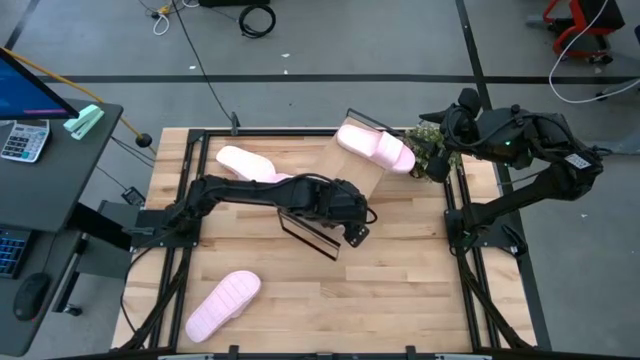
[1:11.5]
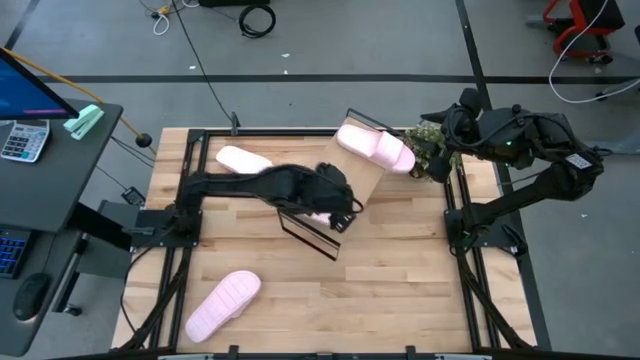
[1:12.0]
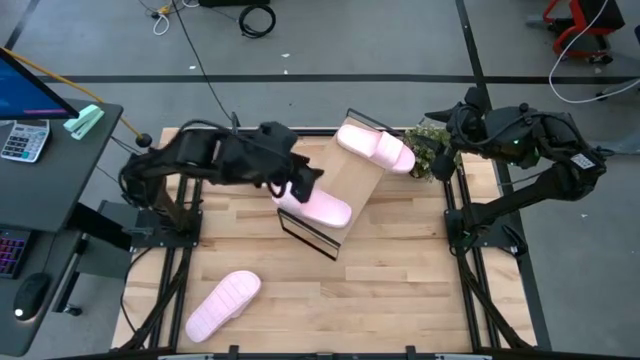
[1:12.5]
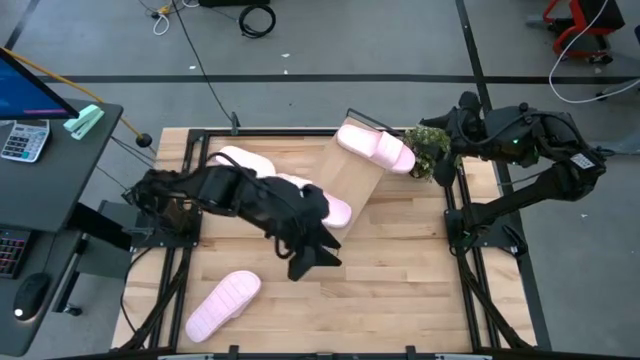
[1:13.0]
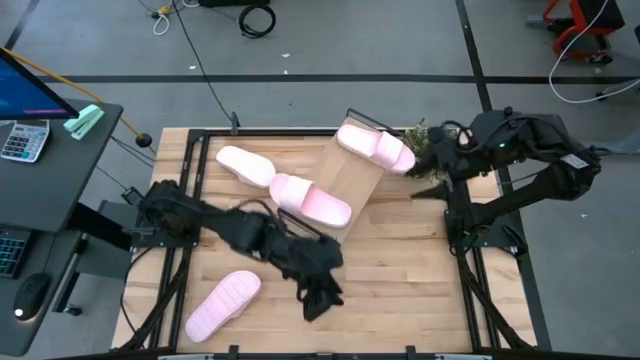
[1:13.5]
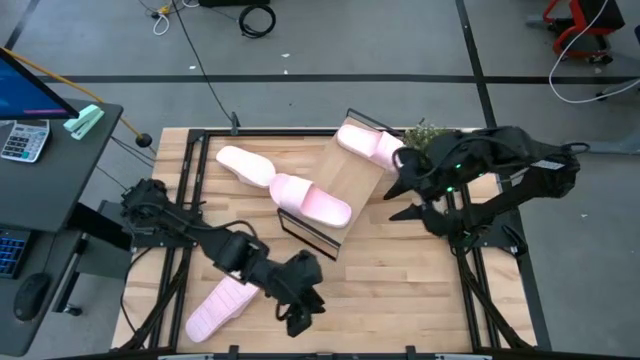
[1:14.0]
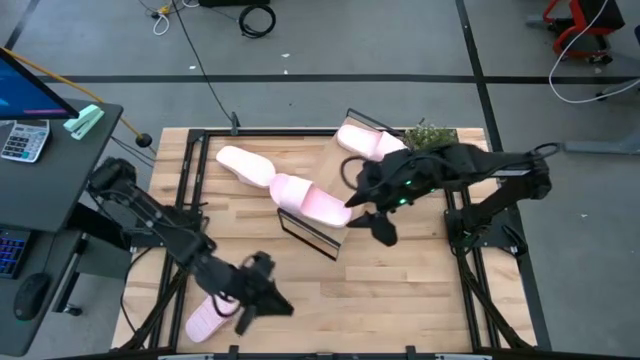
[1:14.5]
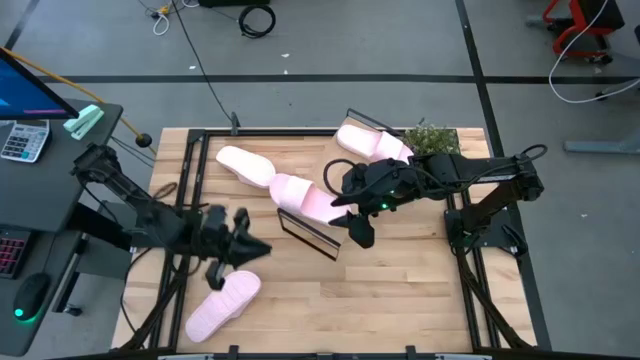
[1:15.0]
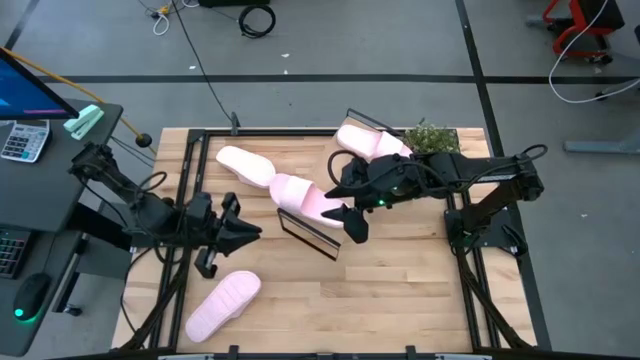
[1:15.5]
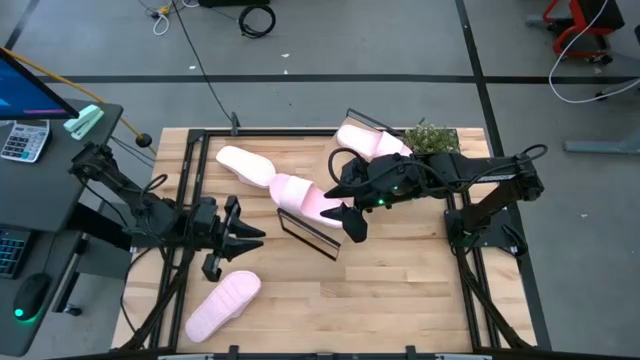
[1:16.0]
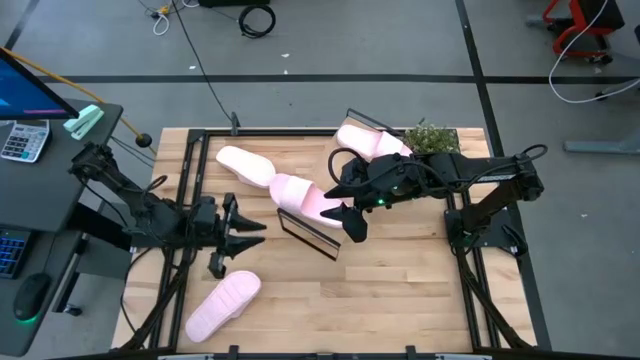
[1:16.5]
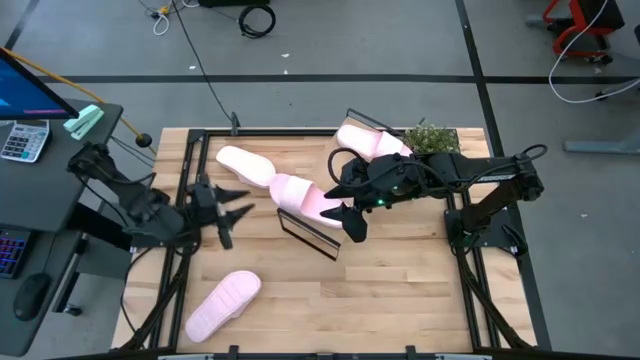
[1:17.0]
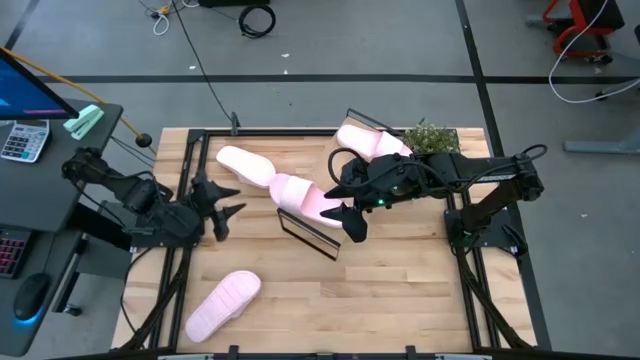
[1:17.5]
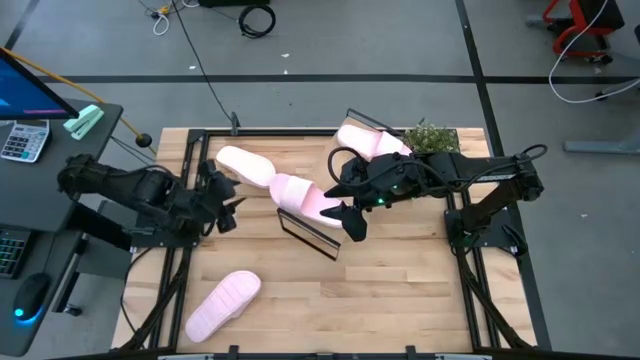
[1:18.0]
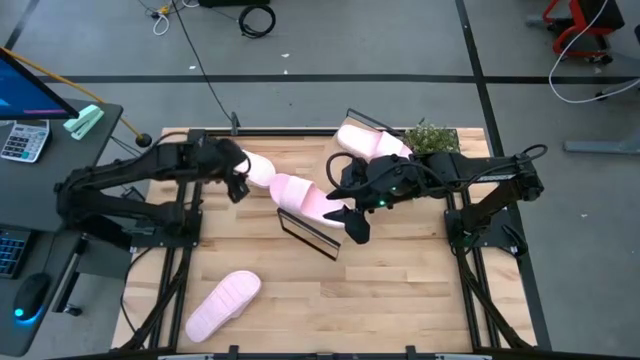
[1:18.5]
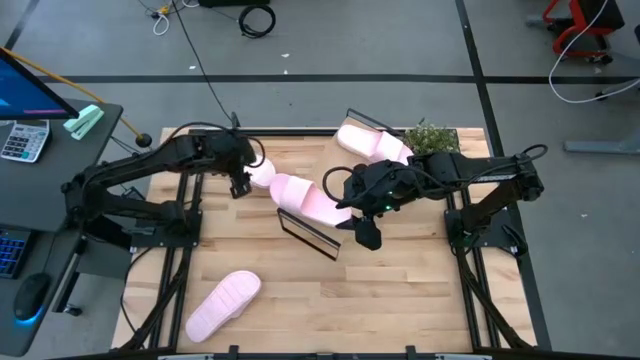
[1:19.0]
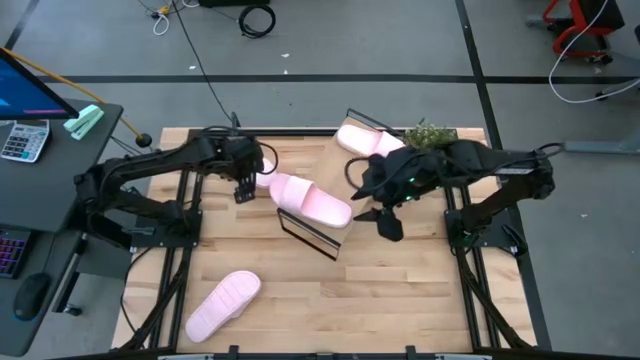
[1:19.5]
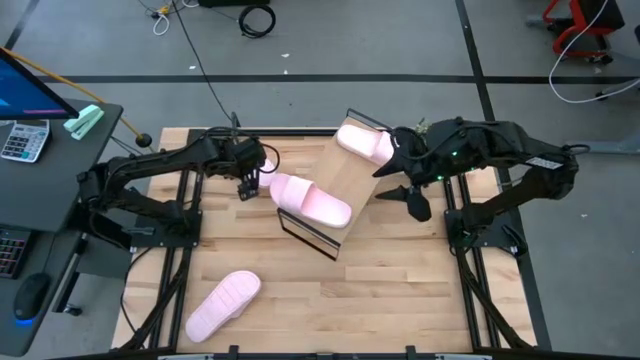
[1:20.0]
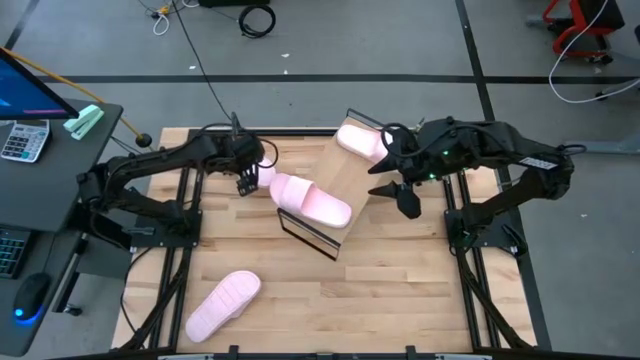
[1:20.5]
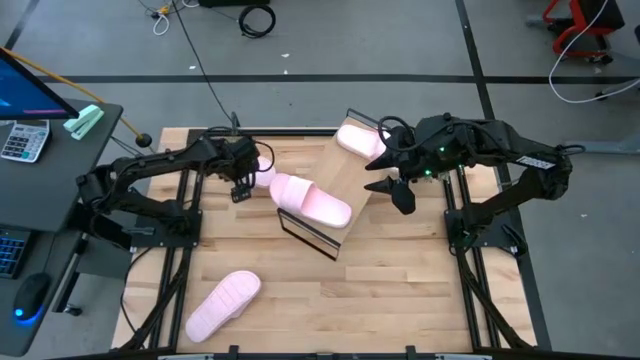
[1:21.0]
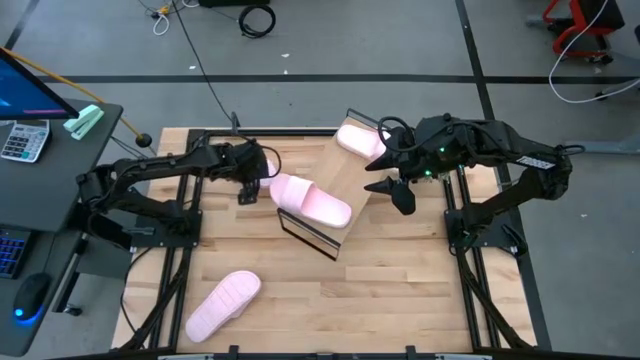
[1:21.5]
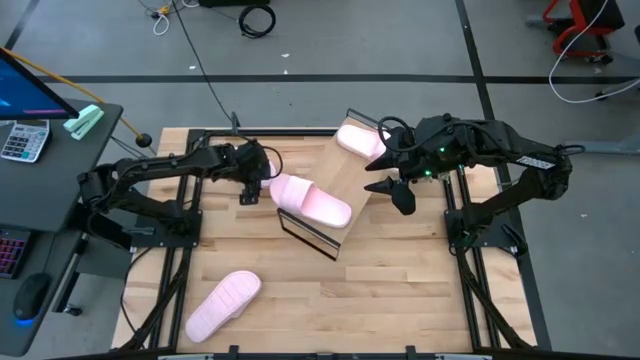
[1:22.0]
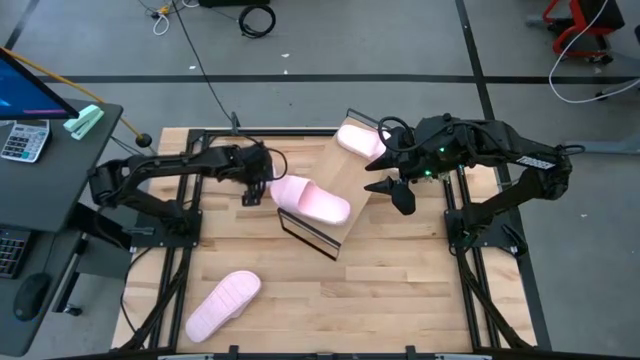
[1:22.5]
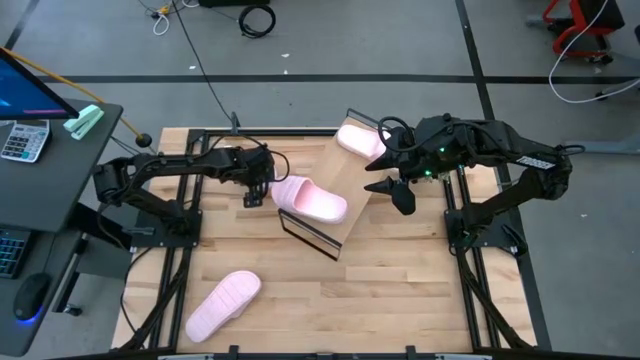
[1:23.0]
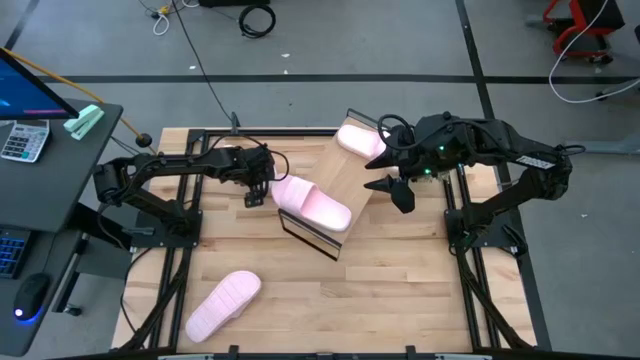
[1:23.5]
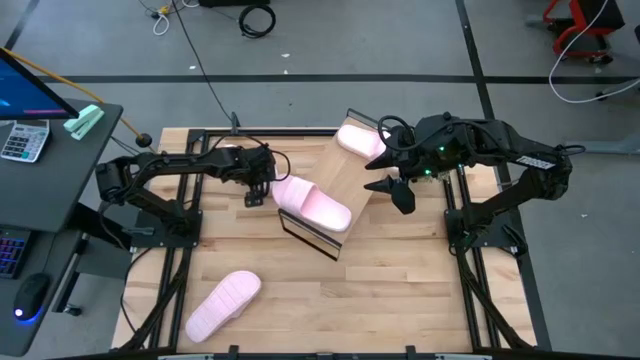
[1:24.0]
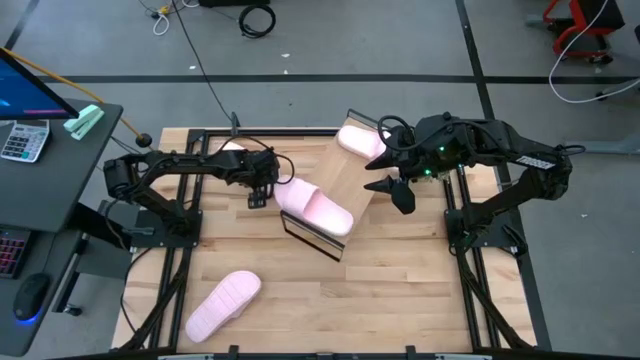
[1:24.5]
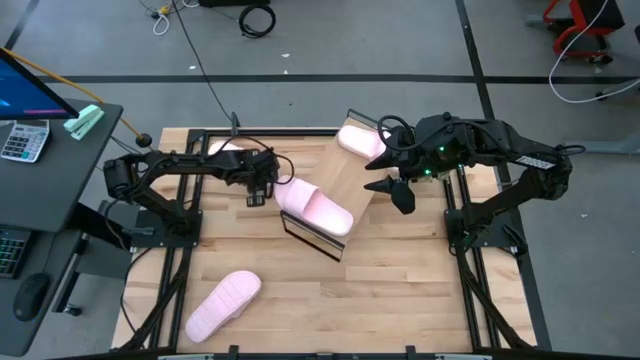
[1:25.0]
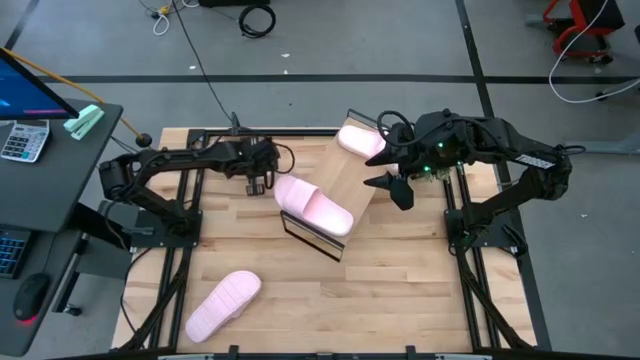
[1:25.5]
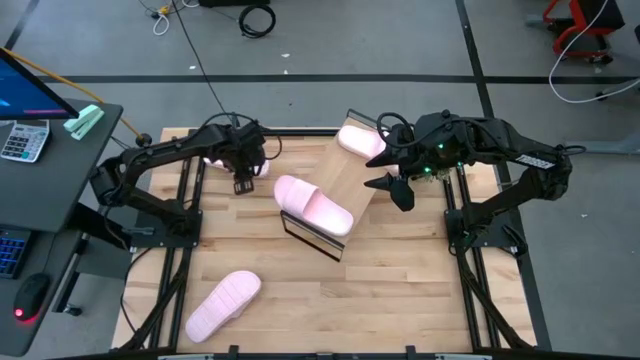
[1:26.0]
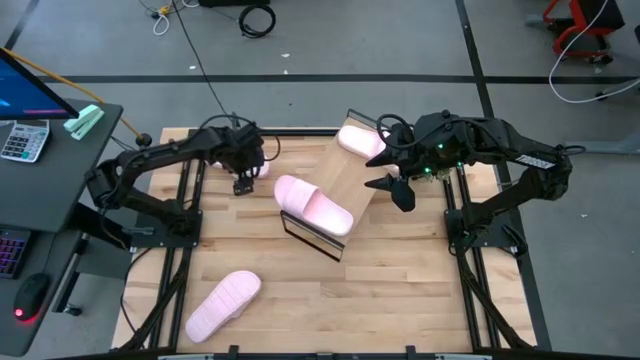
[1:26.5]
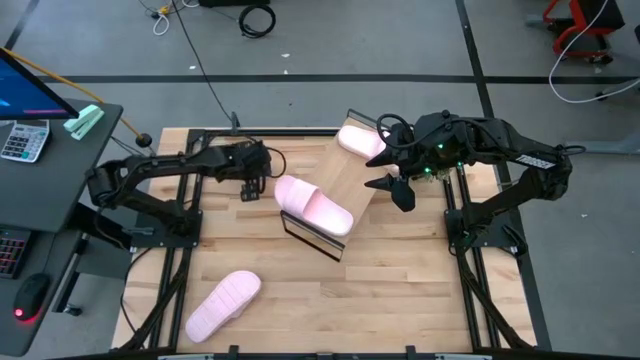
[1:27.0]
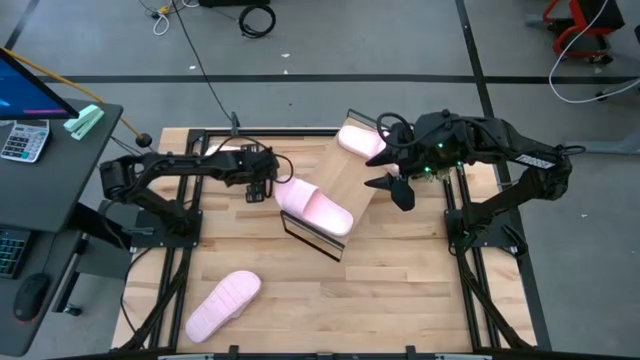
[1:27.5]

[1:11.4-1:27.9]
Task: Pick and place slides into the shelf
Put the top pink slide on the shelf

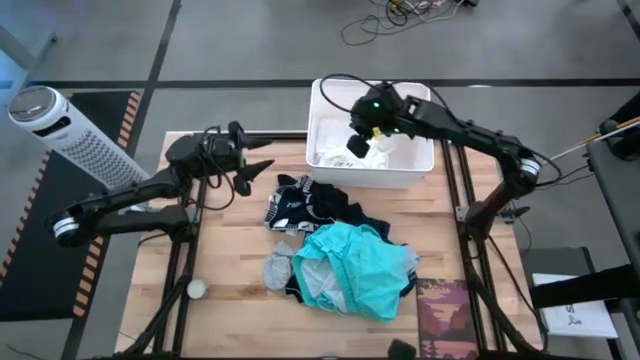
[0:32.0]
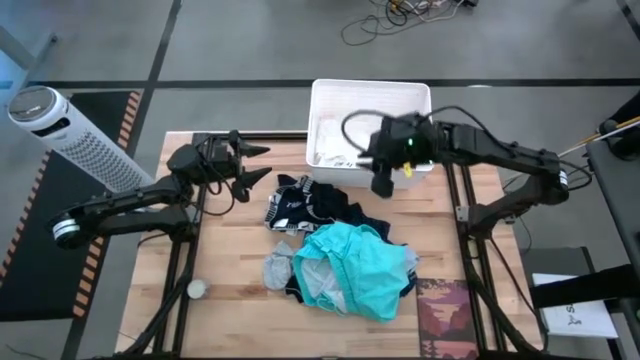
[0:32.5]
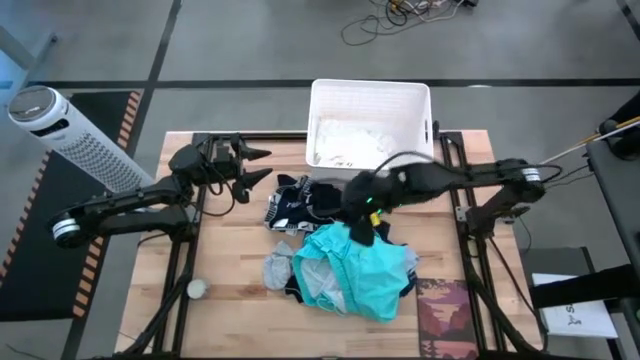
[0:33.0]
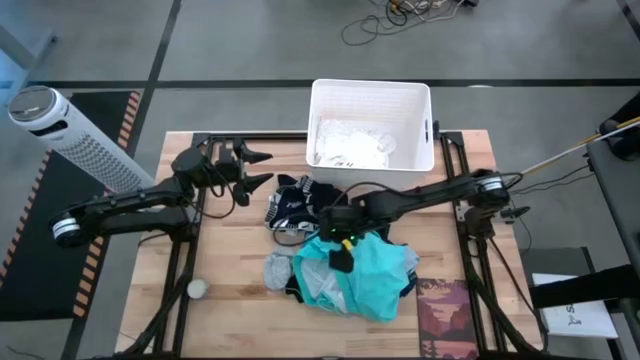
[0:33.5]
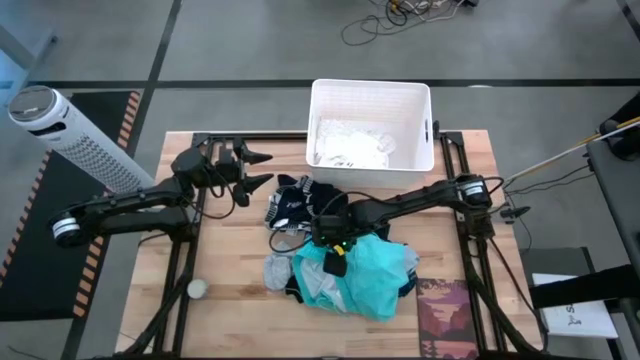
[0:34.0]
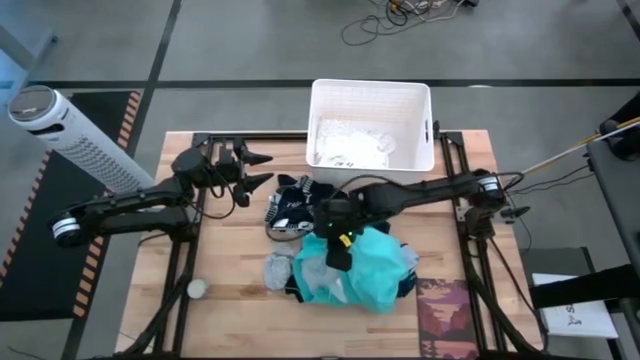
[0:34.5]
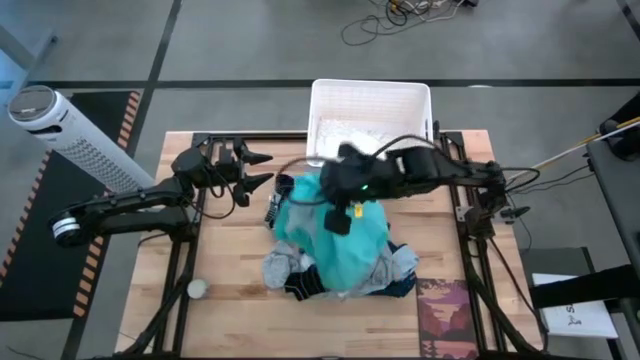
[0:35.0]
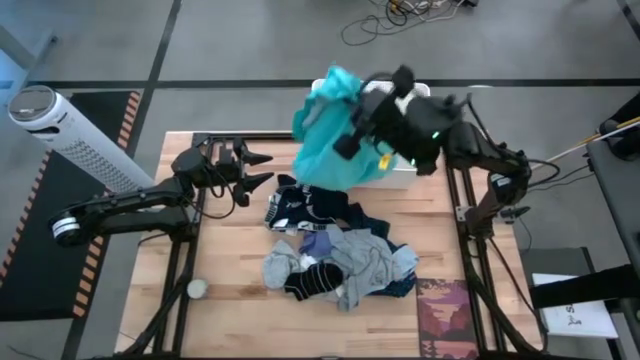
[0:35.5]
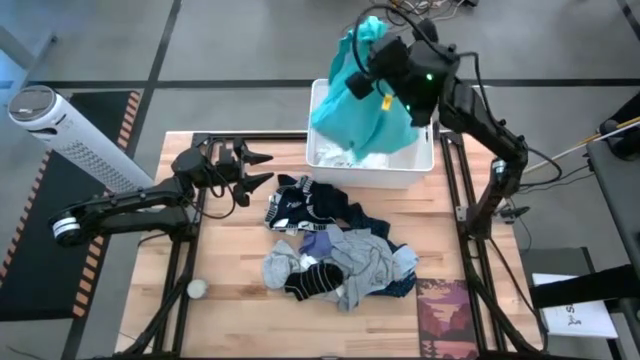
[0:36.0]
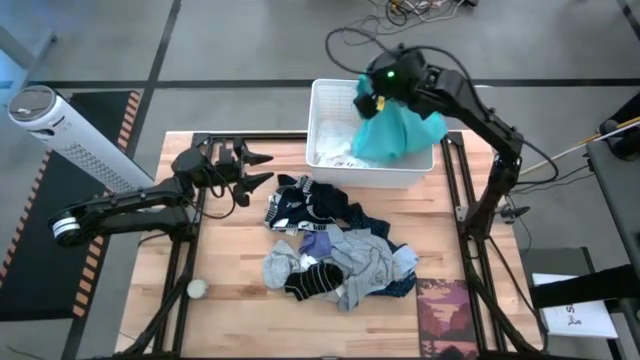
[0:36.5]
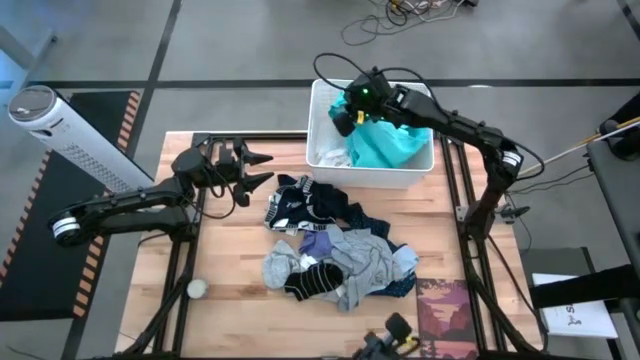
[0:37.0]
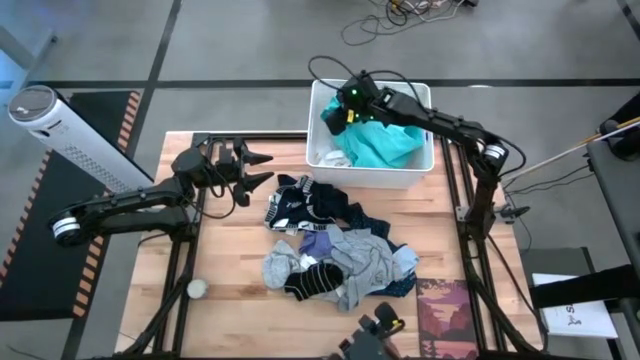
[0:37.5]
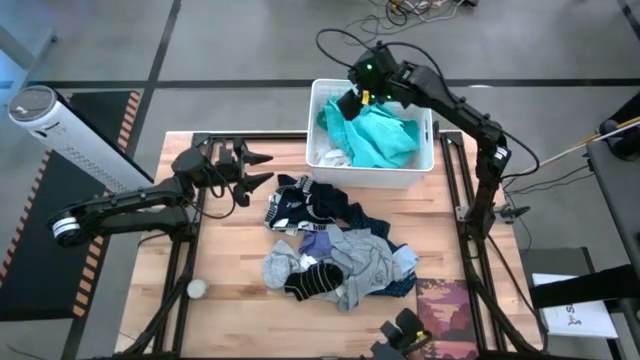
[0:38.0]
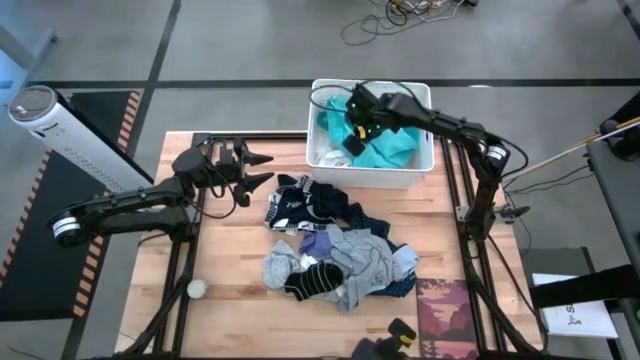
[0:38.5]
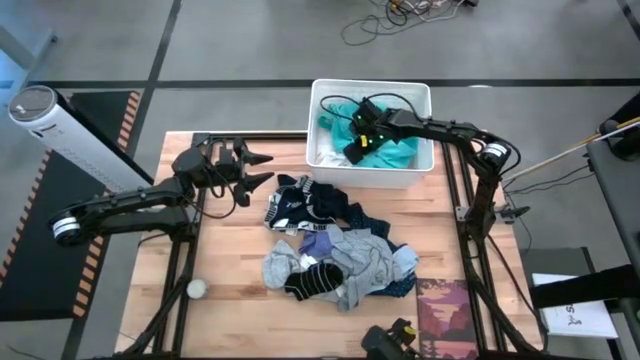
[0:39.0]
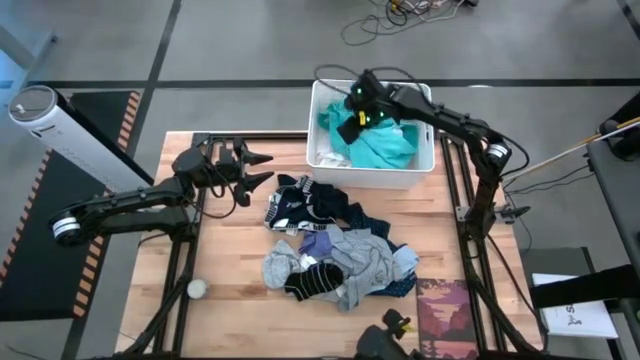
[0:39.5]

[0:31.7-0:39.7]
Task: Sort clothes
Put the blue short into the white laundry bin
